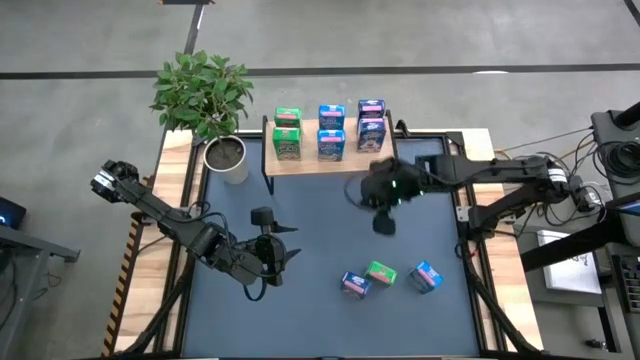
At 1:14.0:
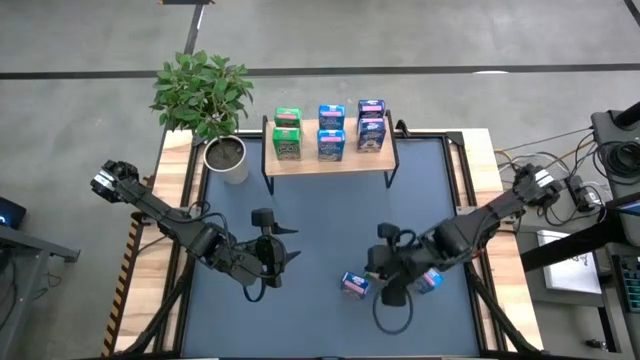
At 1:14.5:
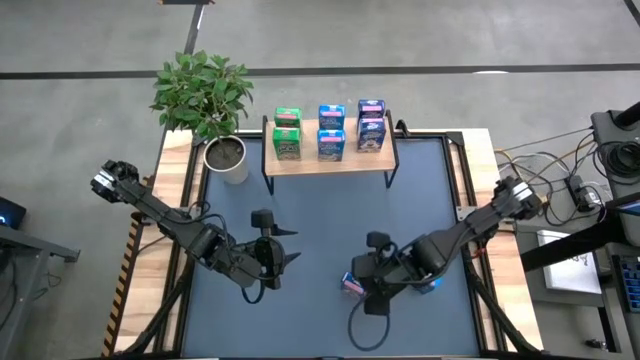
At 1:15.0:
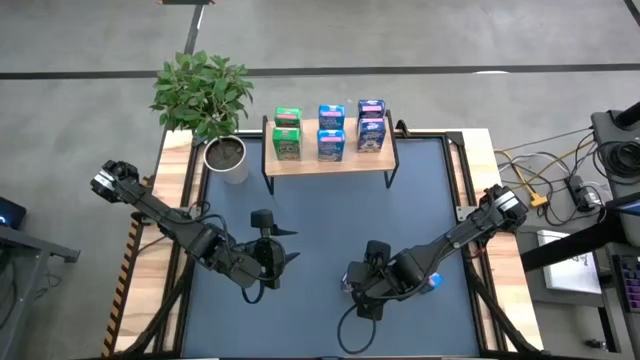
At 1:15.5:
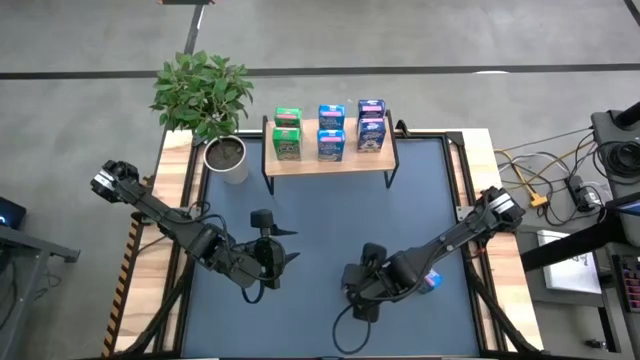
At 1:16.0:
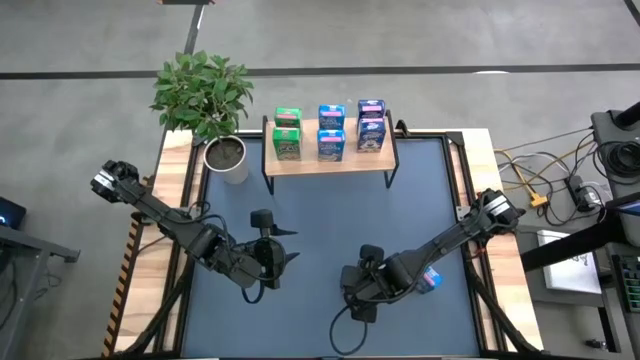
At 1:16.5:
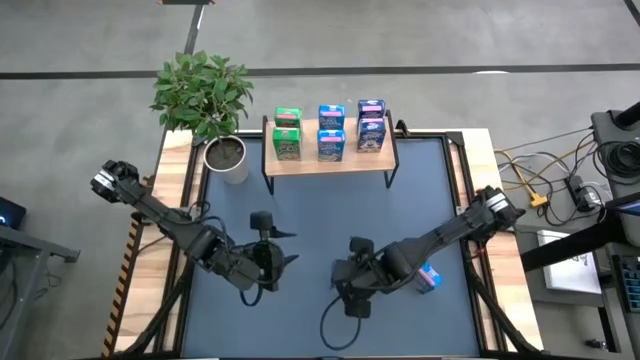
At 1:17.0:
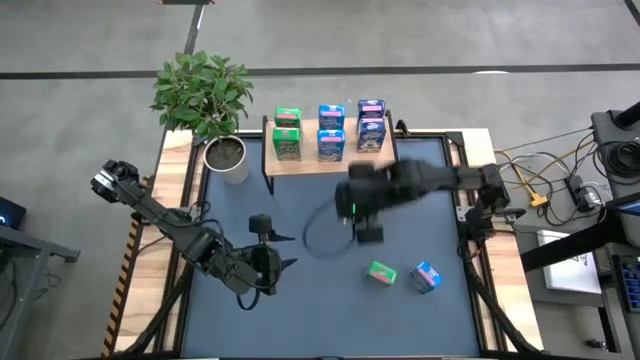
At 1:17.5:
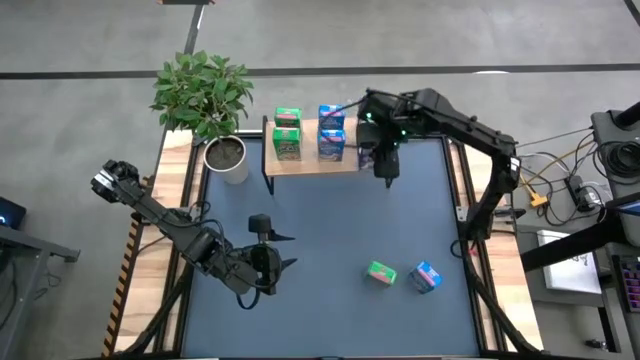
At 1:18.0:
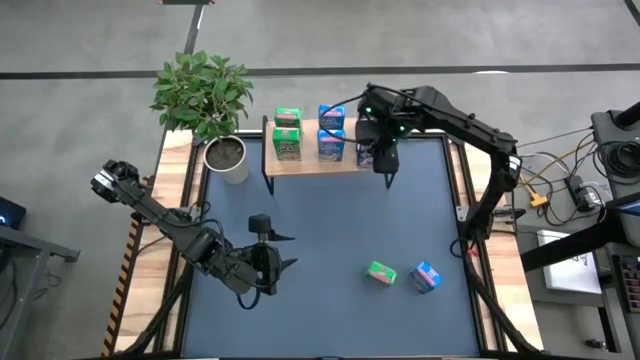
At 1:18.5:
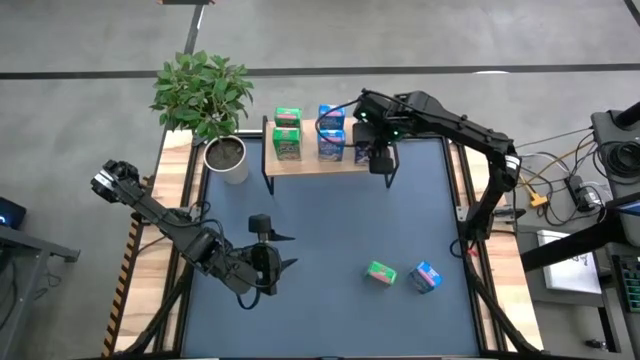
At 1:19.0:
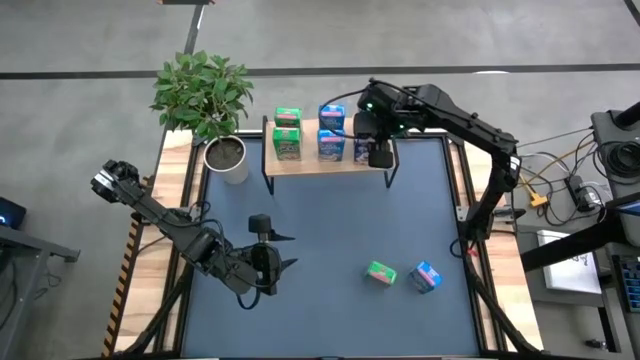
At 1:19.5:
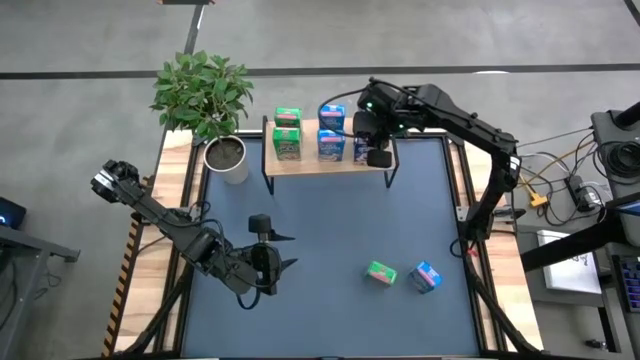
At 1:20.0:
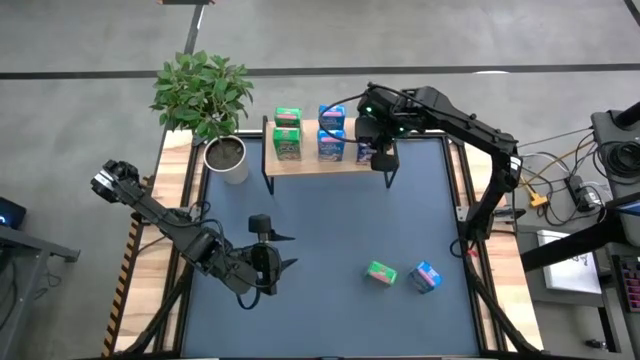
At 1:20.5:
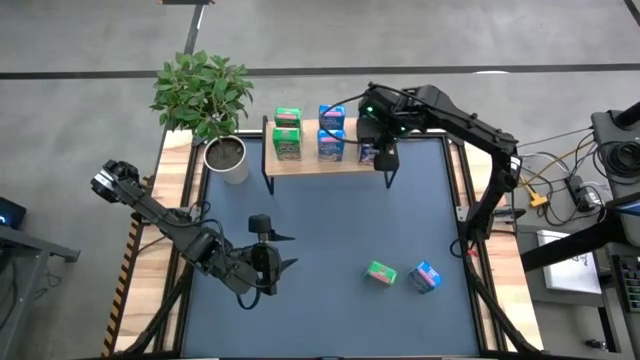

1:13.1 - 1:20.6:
Task: Stack cereal on shelf
Put the blue cereal box on the shelf

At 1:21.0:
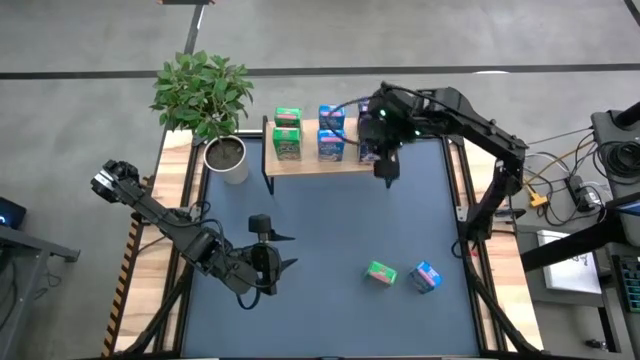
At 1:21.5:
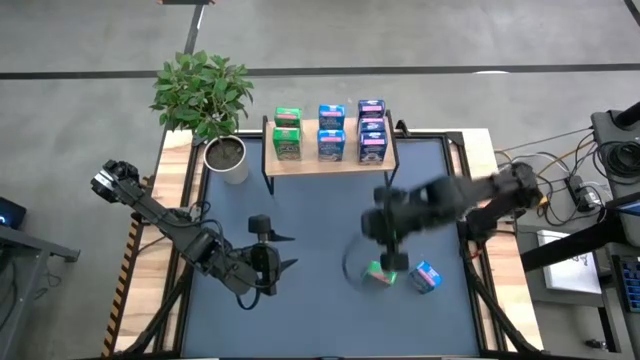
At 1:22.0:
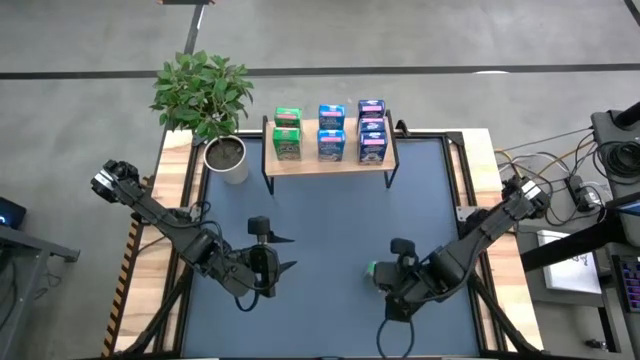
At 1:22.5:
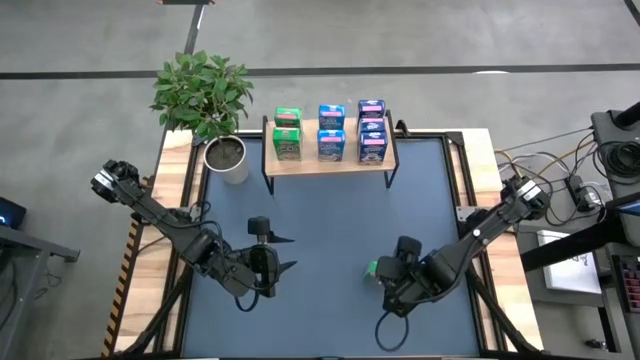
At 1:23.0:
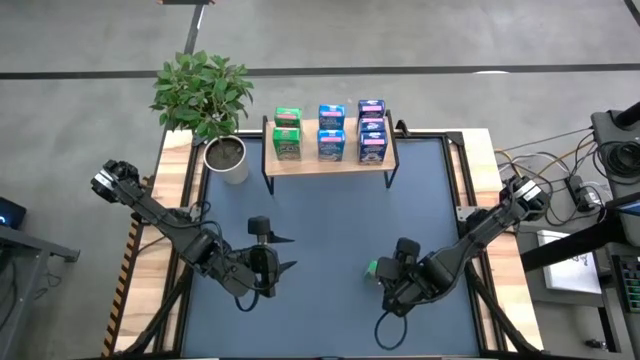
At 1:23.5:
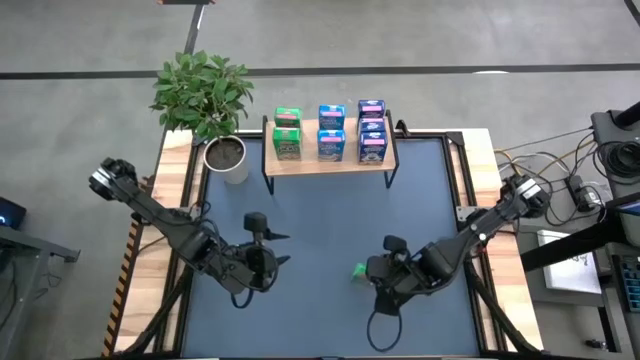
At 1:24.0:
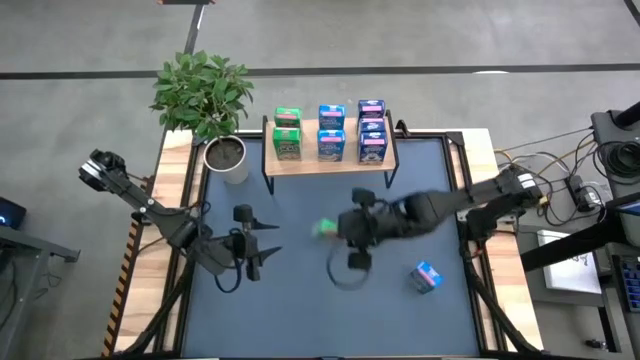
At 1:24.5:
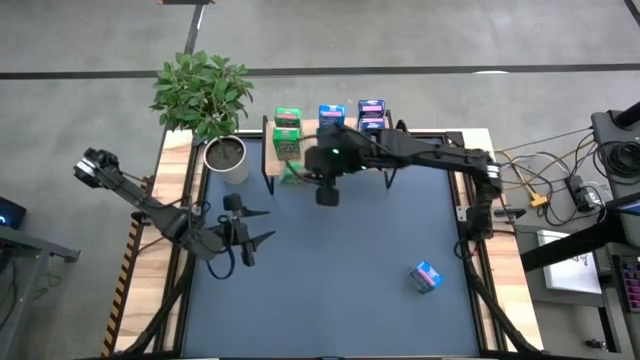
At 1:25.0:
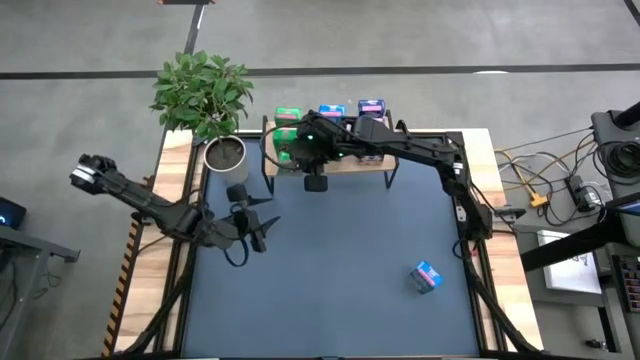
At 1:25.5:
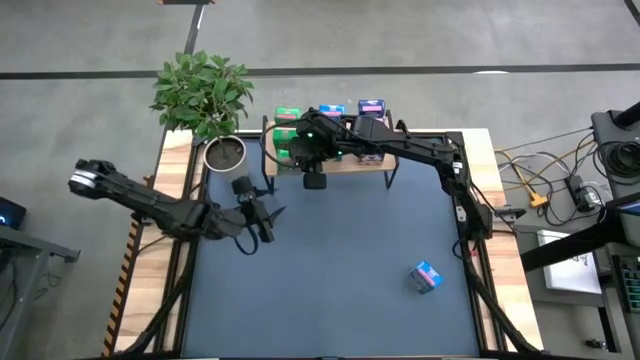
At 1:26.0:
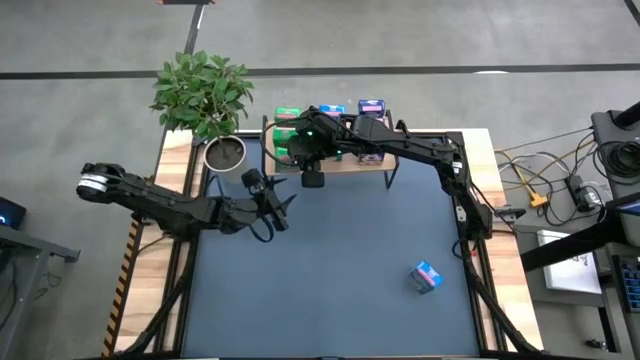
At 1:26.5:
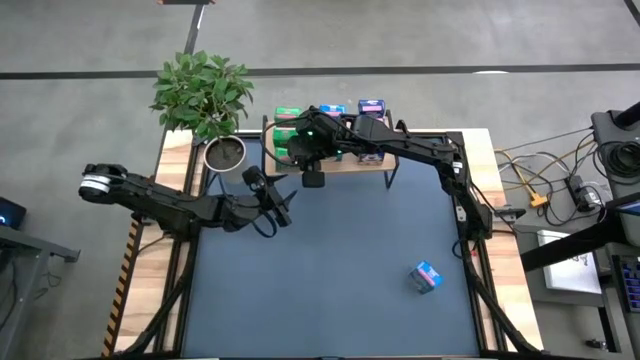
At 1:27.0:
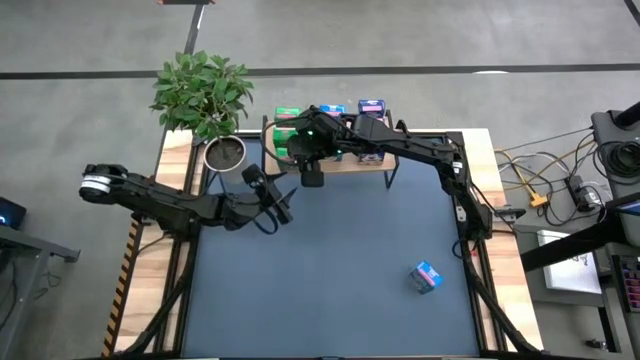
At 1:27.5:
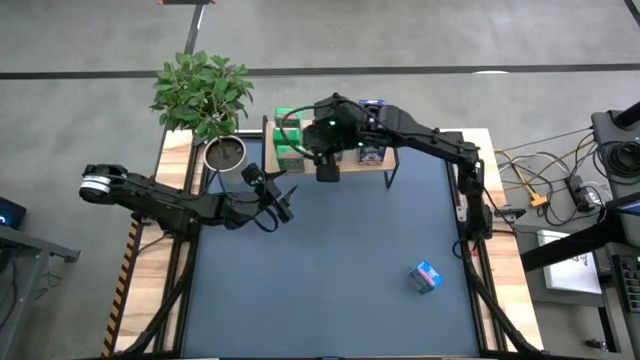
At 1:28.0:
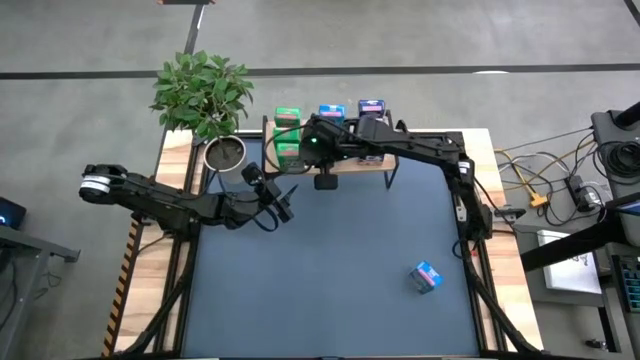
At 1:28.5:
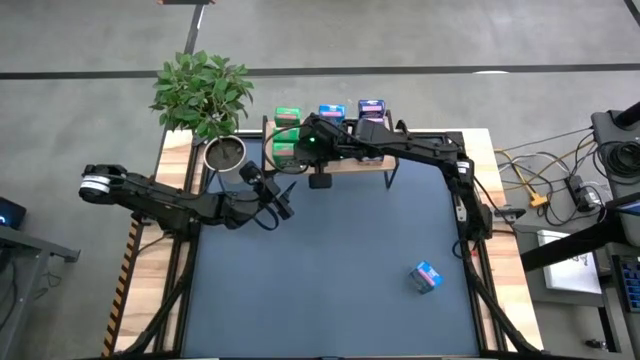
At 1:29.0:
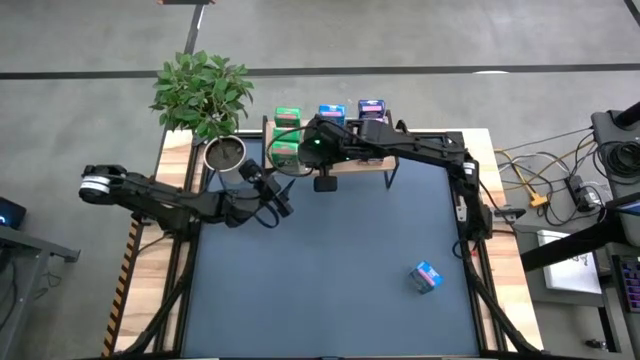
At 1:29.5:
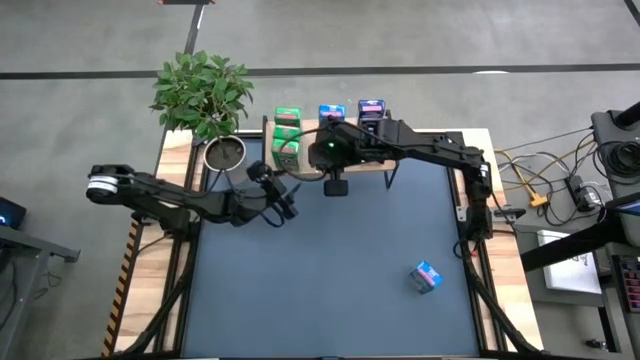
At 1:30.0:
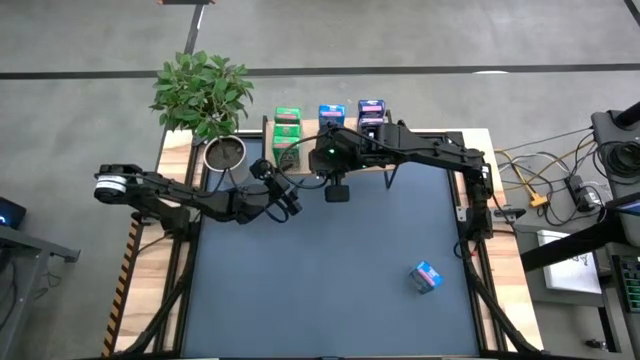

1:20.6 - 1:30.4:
Put the green cereal box on the shelf

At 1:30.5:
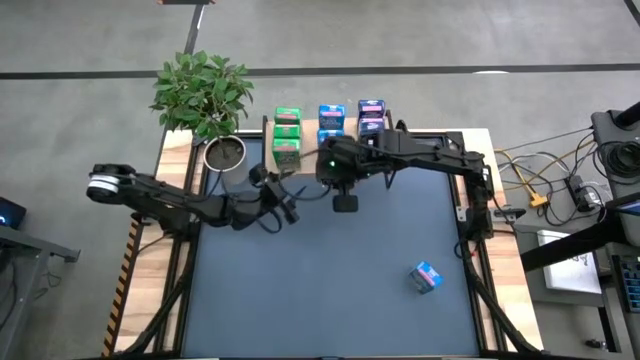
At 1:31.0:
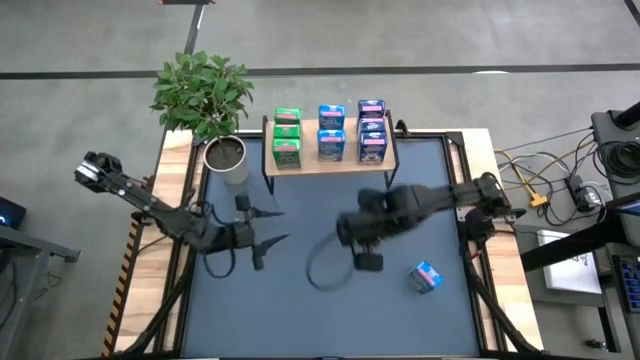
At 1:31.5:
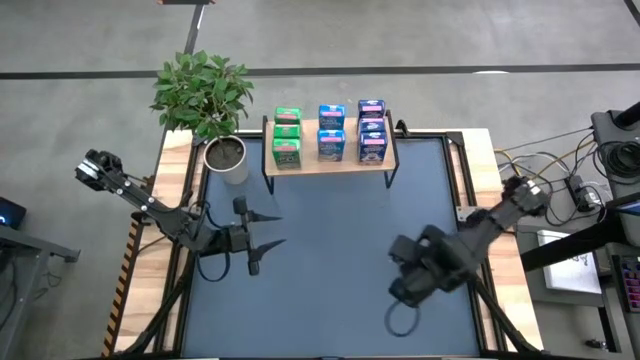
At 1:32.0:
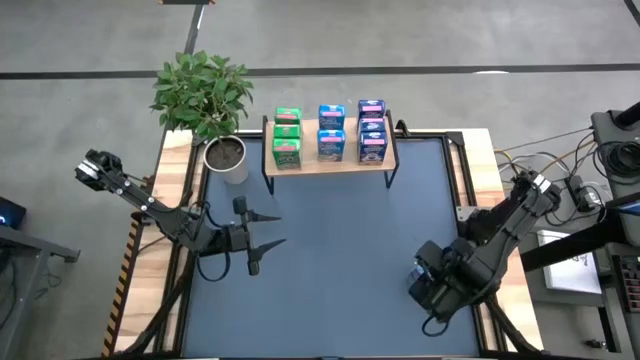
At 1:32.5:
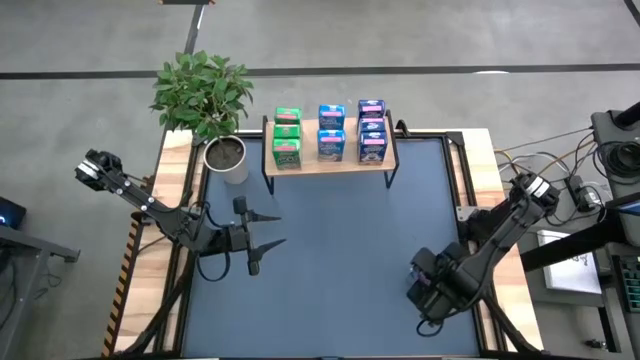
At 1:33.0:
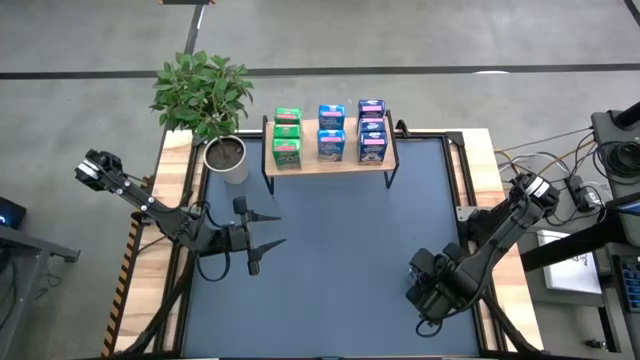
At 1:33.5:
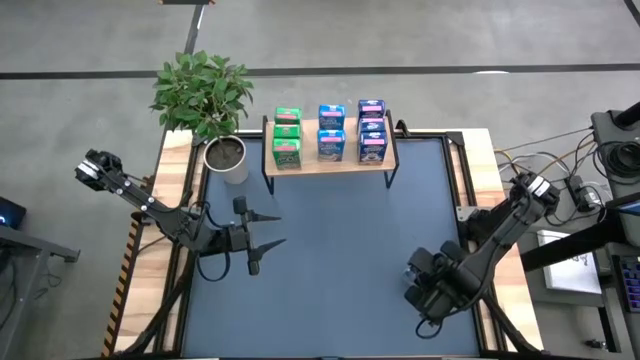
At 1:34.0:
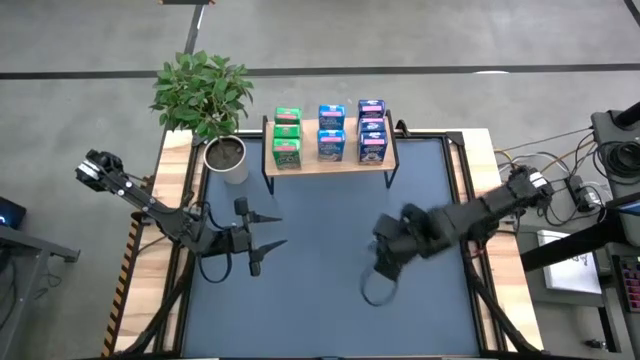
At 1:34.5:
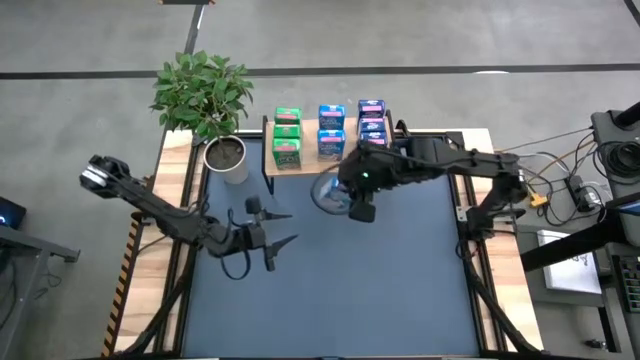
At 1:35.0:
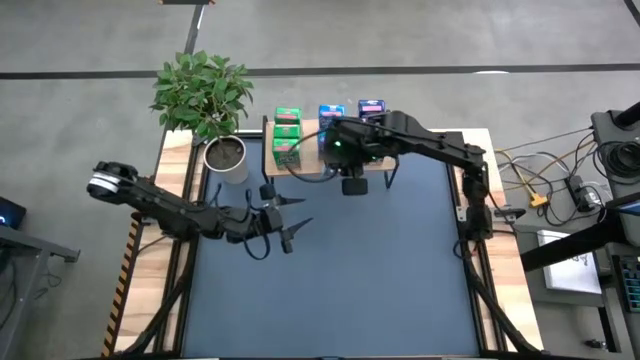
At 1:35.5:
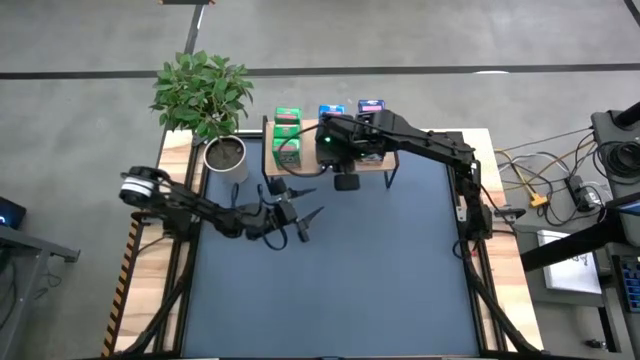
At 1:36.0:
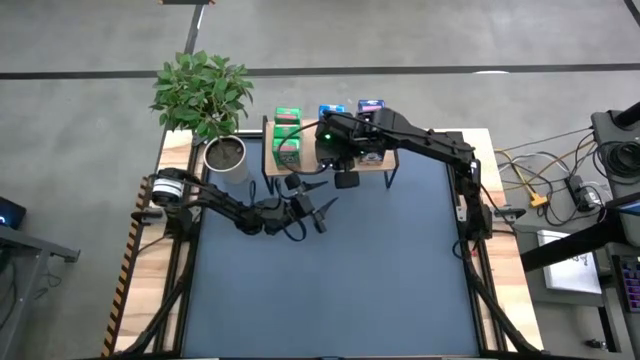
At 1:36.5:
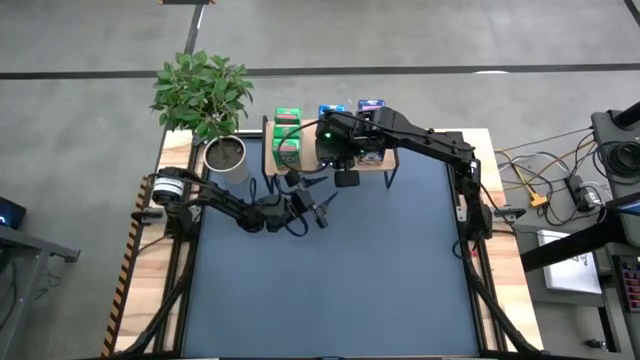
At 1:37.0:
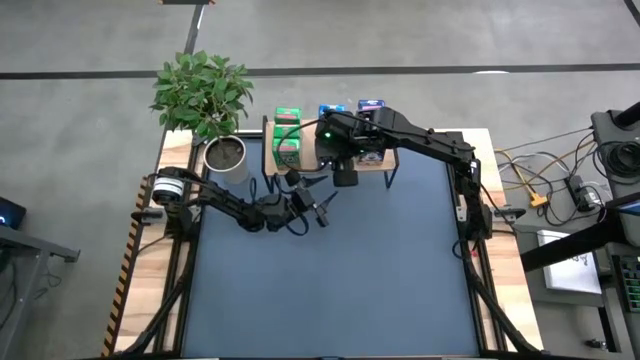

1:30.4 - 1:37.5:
Put the light blue cereal box on the shelf
